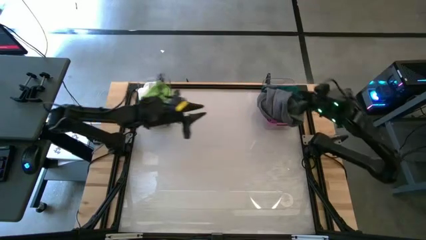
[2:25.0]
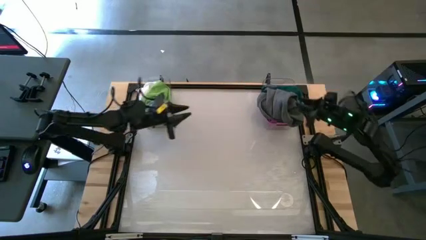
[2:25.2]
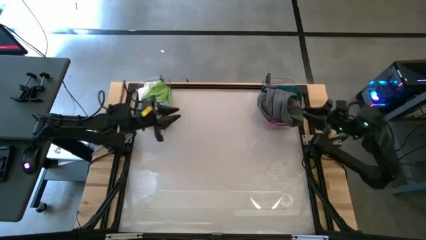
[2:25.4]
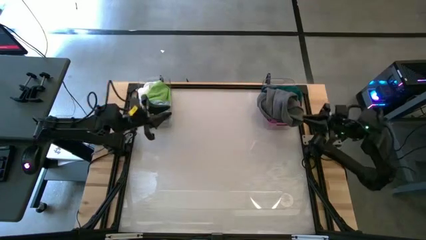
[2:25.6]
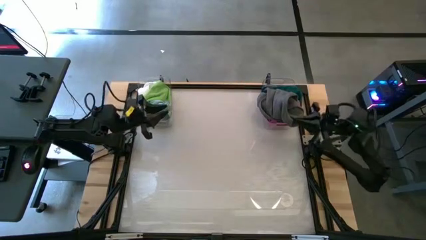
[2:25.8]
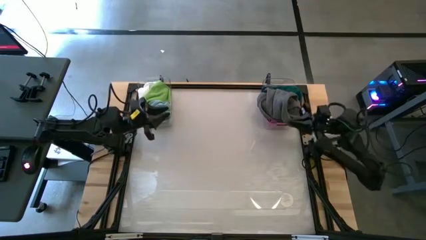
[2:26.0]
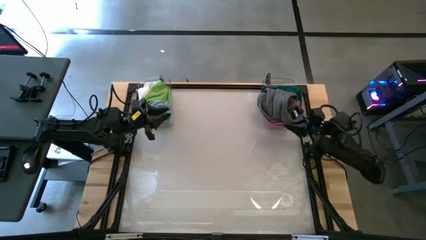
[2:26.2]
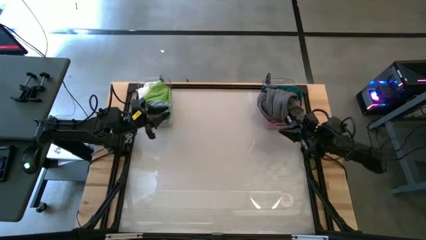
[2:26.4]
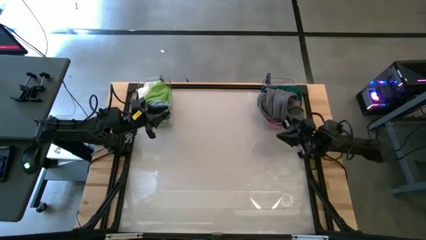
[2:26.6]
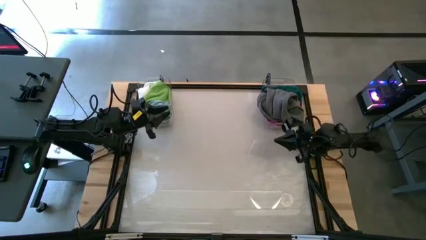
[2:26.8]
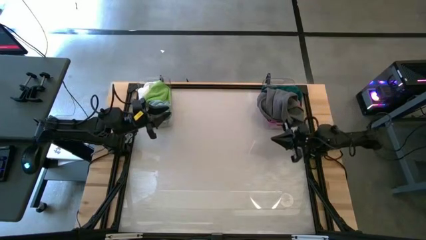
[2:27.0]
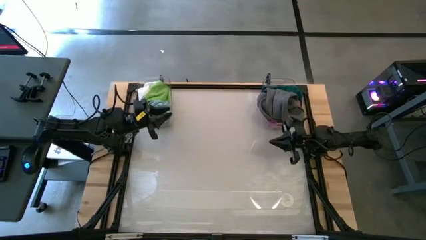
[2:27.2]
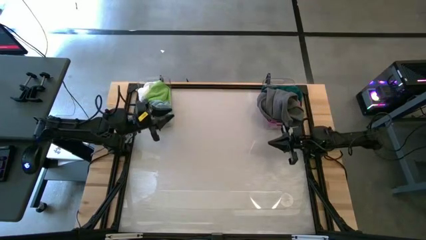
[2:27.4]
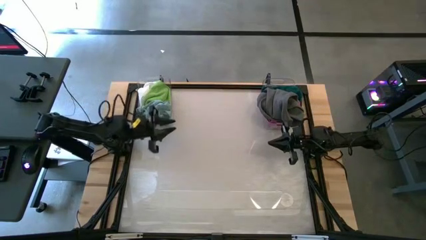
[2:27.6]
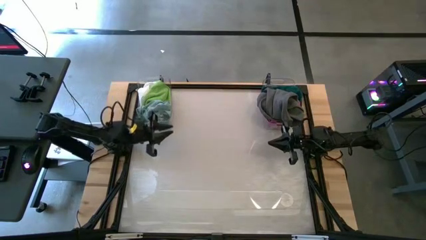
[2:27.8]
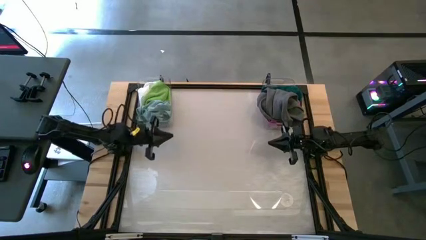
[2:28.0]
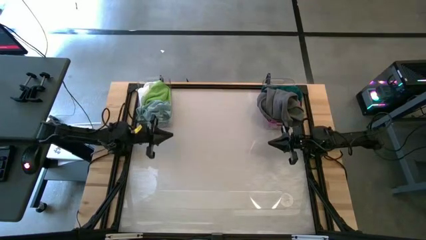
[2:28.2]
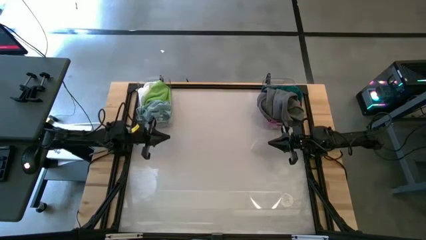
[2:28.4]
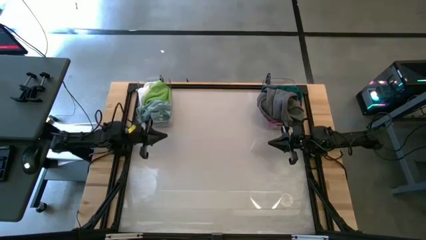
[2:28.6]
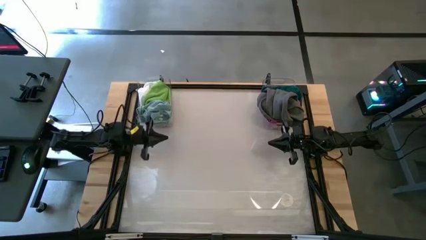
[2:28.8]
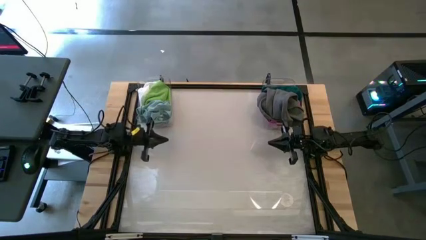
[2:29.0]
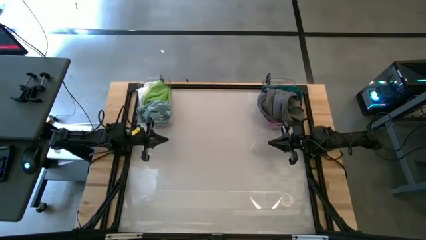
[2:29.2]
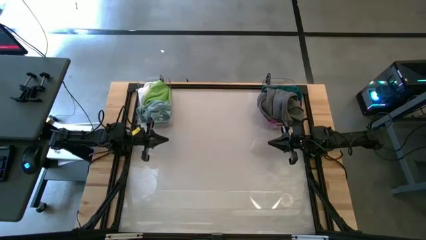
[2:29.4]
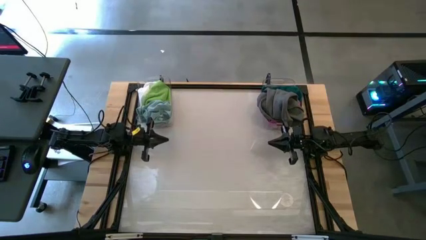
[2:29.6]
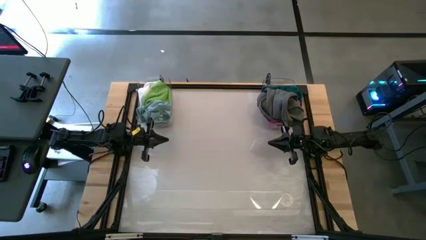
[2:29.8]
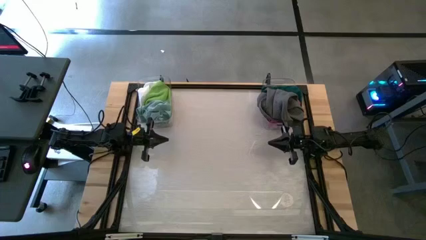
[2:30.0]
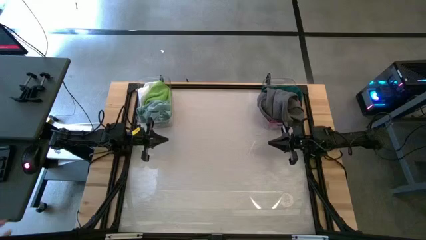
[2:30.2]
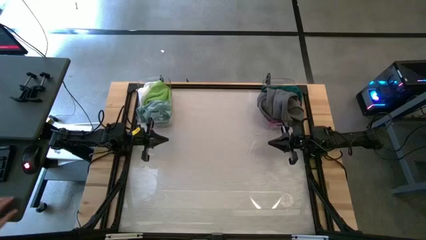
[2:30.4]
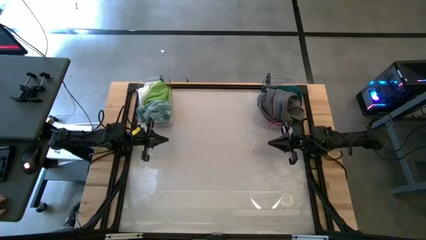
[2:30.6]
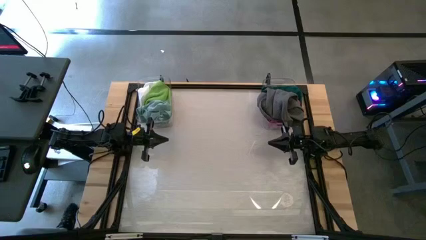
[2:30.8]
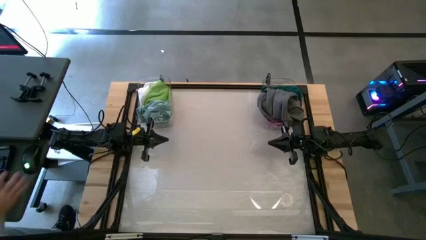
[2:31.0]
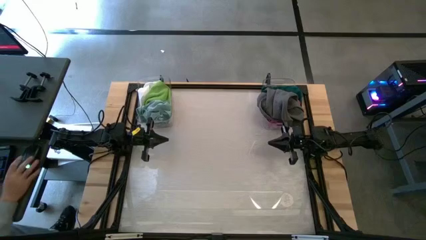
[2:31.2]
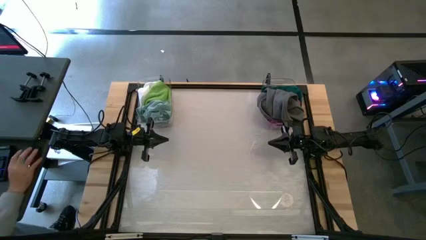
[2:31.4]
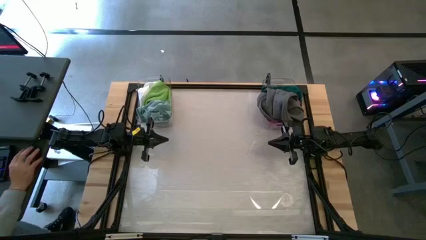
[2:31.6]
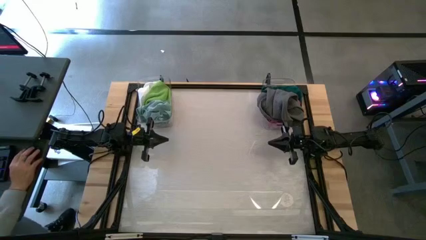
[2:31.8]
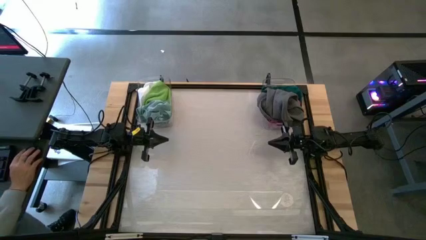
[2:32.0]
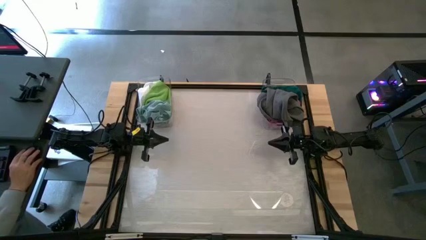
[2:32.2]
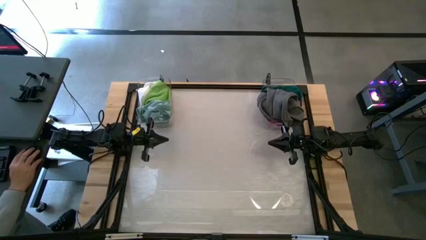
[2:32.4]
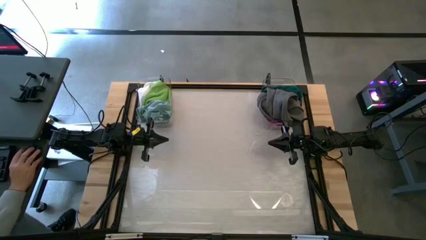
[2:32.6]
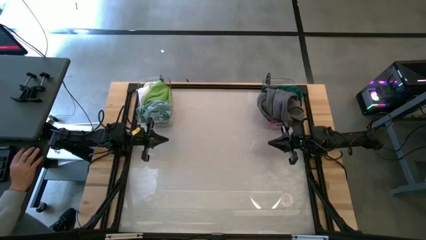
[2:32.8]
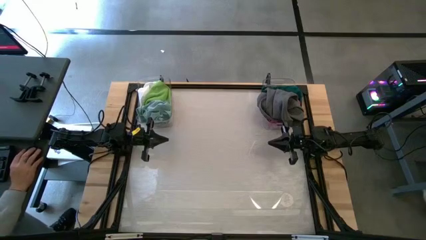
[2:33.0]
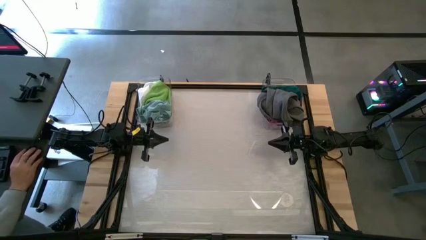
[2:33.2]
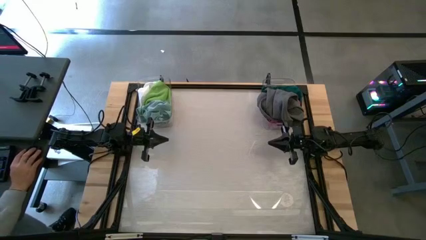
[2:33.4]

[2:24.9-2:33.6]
Task: Sort towels by color in basket
Return to Home Position

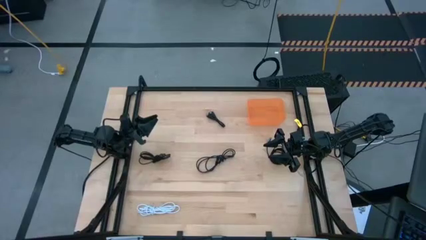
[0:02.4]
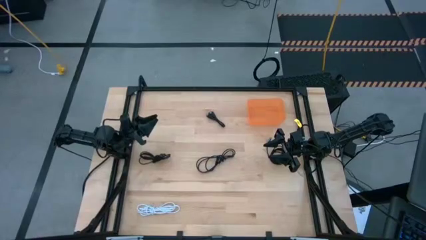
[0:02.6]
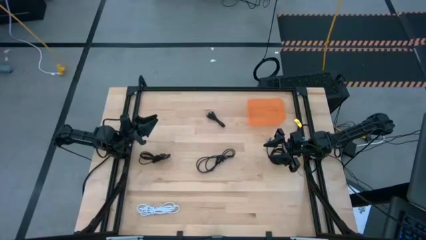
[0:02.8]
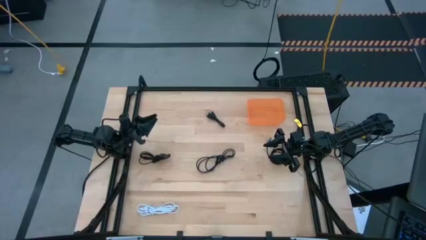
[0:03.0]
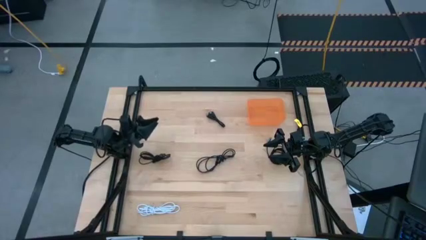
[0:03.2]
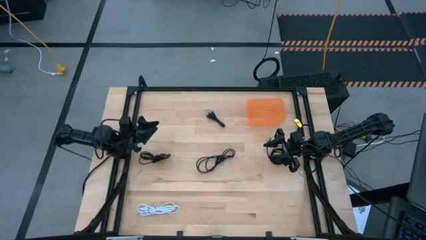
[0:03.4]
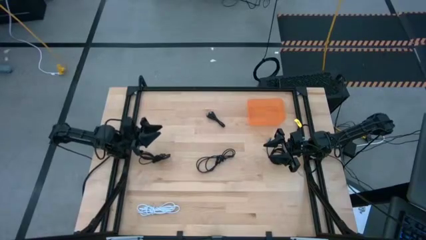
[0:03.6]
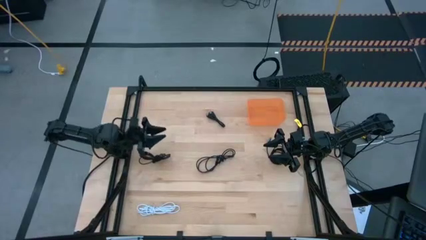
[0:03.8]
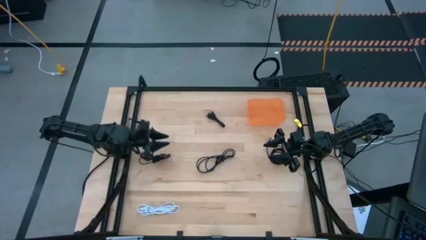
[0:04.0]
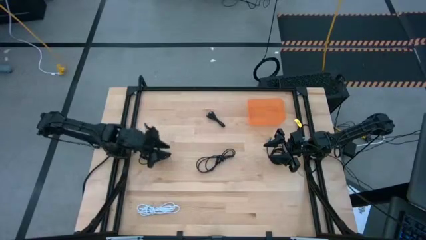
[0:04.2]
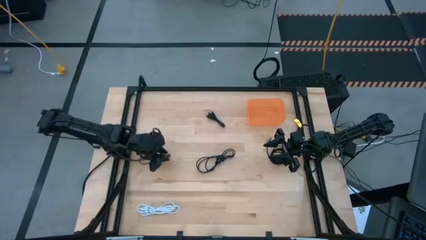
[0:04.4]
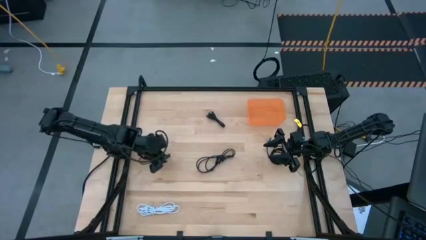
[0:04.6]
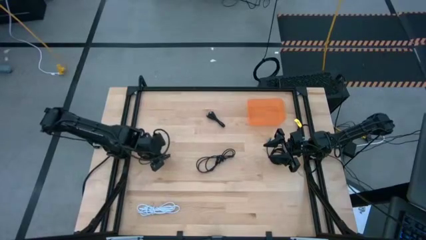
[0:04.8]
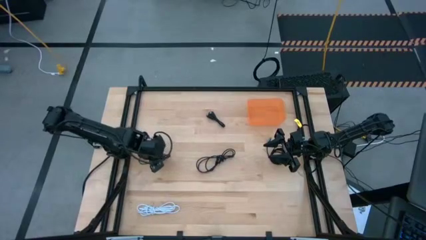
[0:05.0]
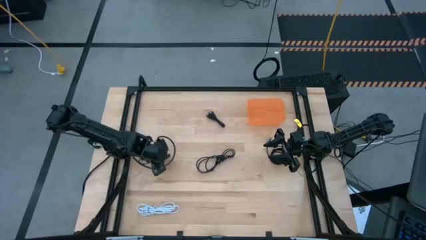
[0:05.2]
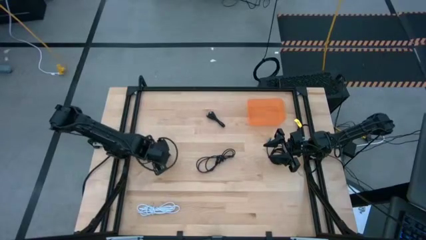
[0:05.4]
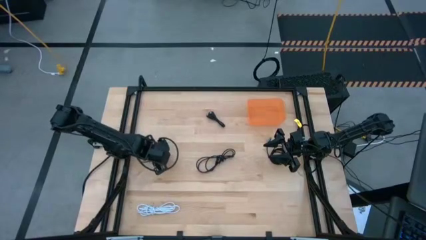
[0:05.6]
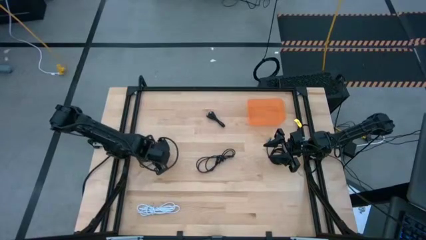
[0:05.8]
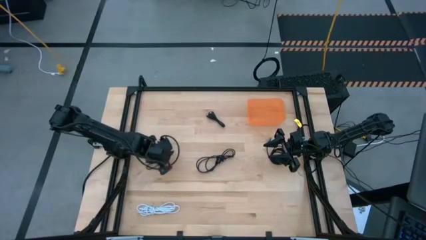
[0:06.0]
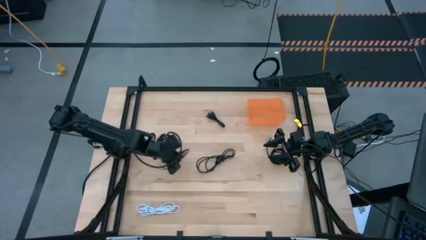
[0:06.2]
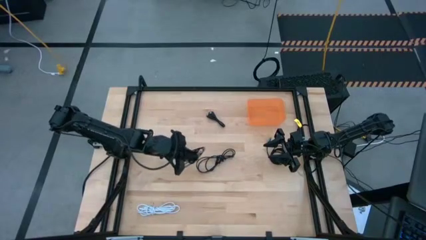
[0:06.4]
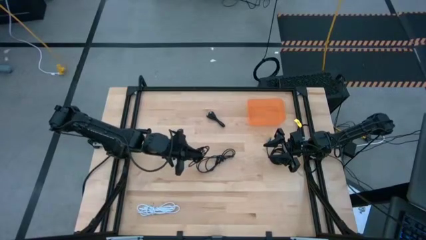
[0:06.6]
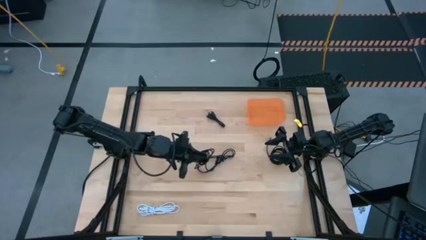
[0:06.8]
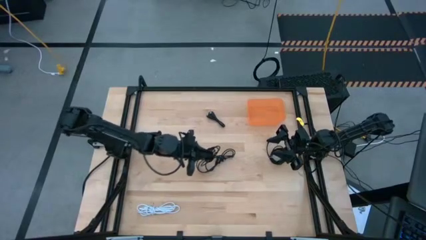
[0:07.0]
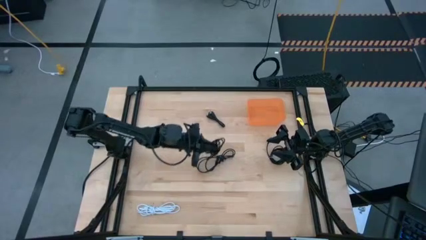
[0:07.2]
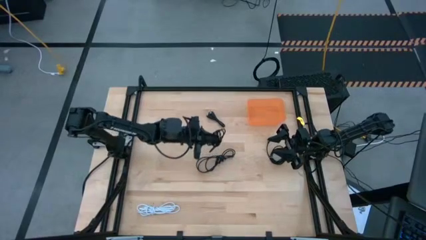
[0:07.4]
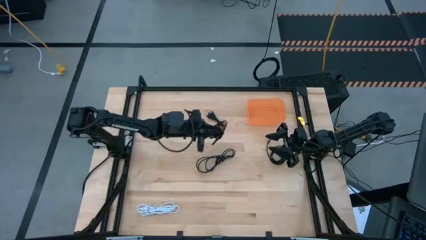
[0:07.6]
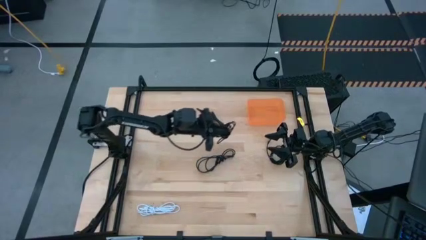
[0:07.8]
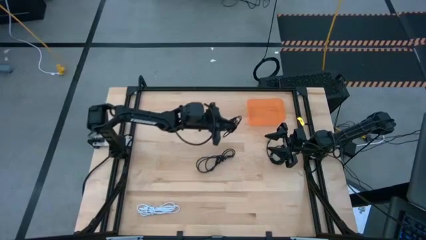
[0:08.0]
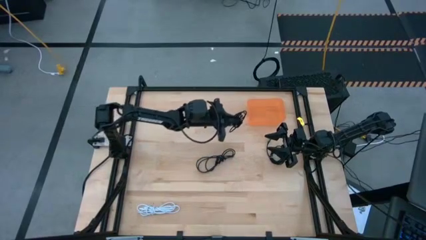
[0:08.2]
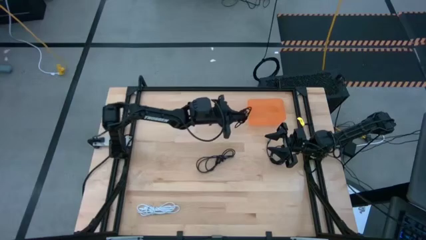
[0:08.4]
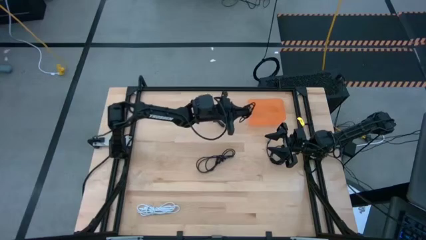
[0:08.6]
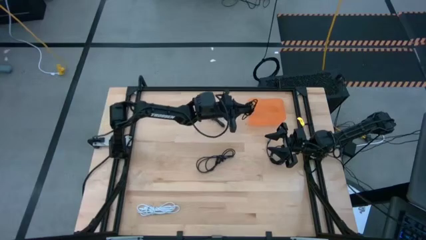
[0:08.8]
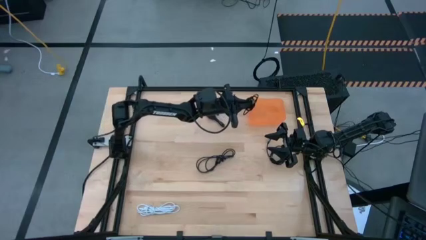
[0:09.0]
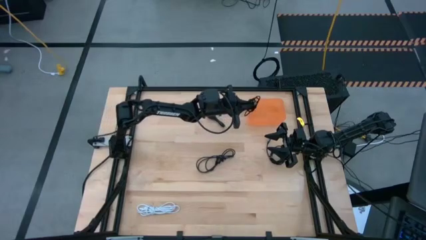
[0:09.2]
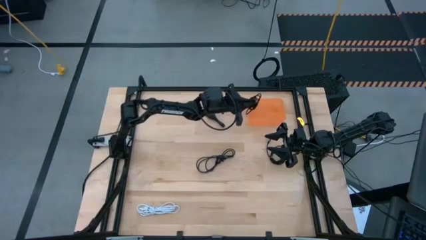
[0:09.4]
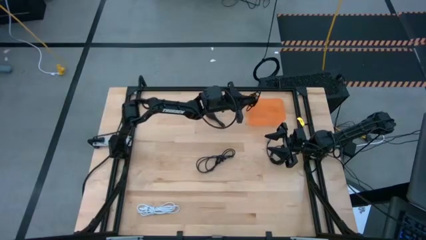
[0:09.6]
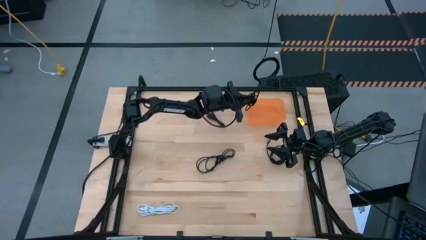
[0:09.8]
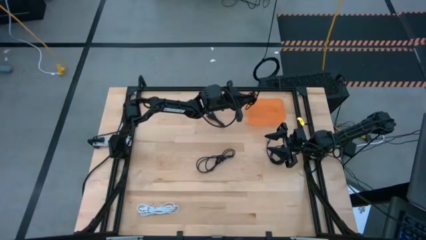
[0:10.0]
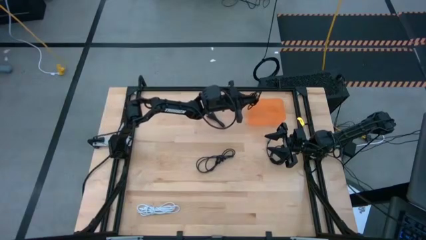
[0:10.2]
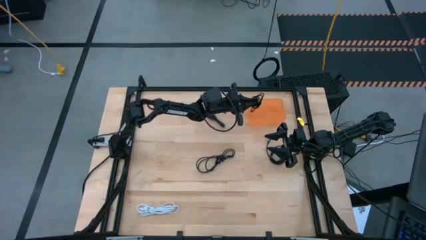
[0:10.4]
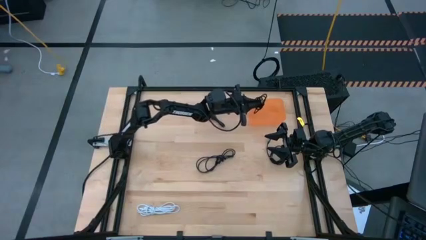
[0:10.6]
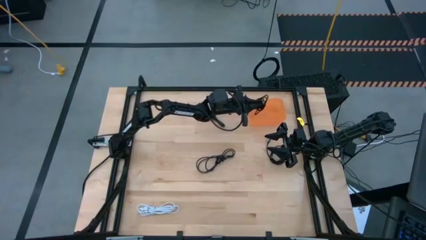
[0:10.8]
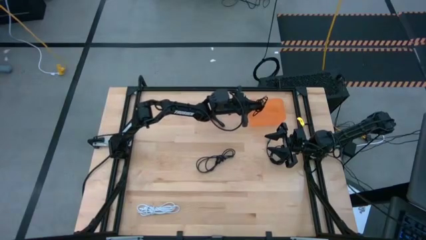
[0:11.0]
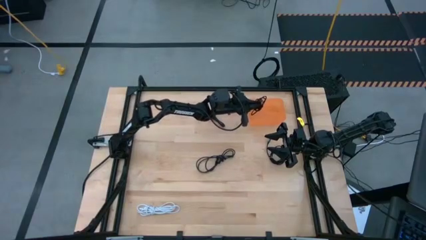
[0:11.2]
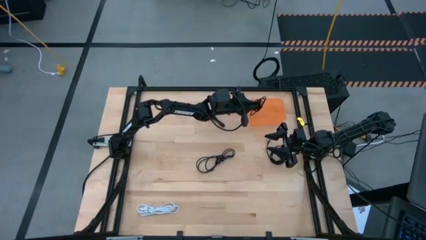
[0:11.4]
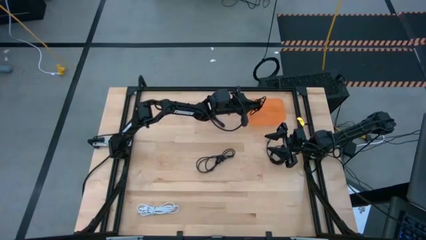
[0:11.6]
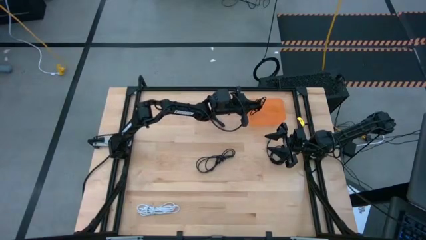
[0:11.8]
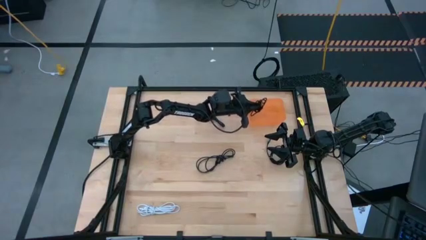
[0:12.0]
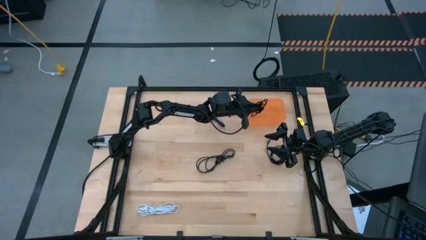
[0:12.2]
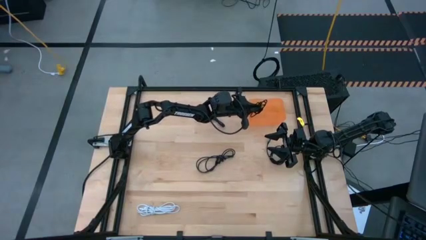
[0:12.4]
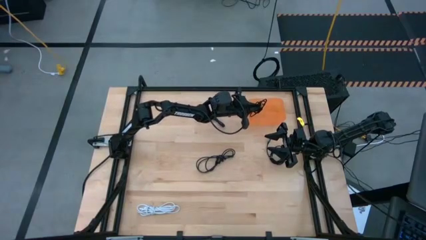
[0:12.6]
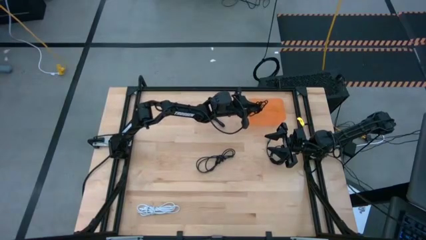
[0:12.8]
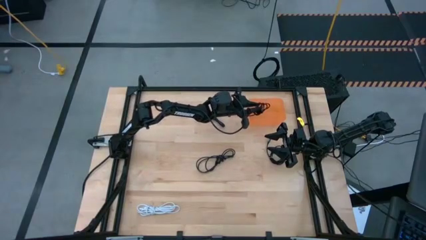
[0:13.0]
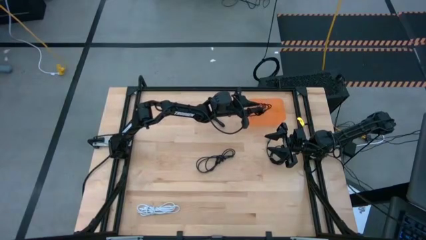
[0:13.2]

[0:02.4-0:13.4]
Task: Pick and place USB-C Cables
Put the black charger cable into the orange bin
